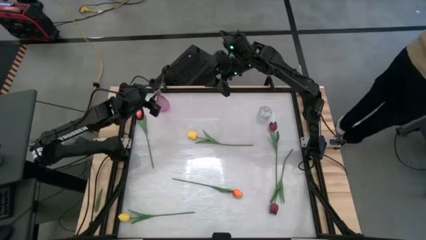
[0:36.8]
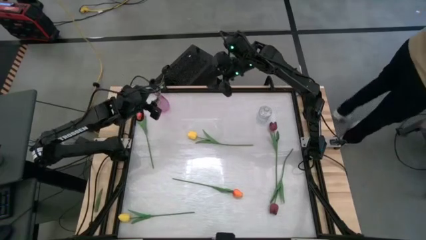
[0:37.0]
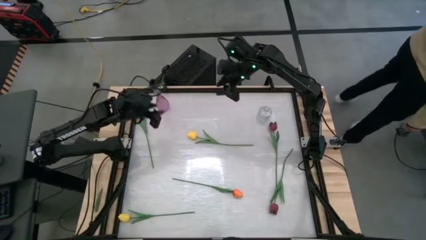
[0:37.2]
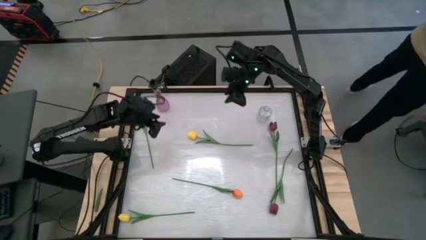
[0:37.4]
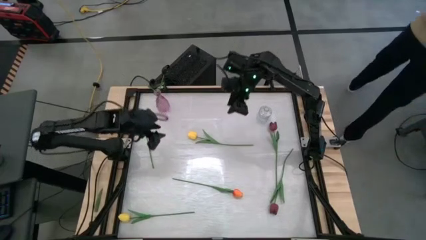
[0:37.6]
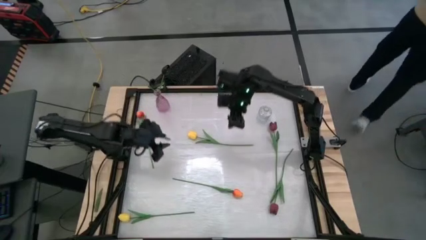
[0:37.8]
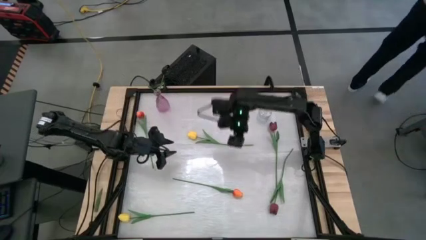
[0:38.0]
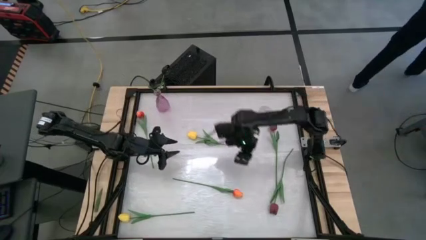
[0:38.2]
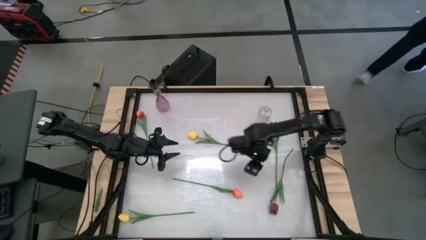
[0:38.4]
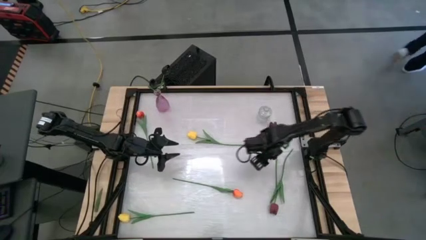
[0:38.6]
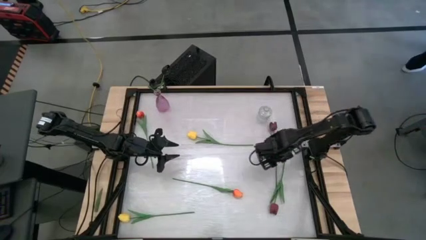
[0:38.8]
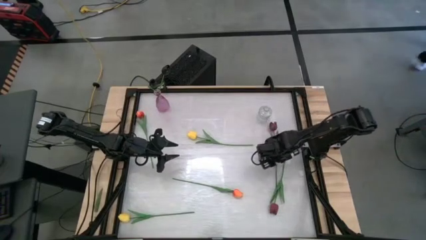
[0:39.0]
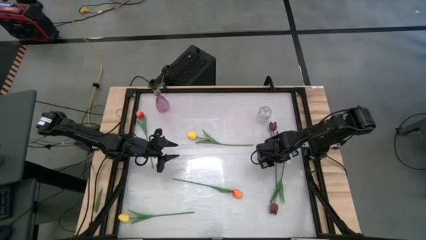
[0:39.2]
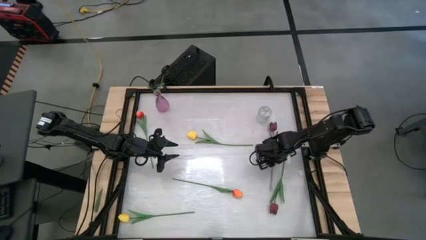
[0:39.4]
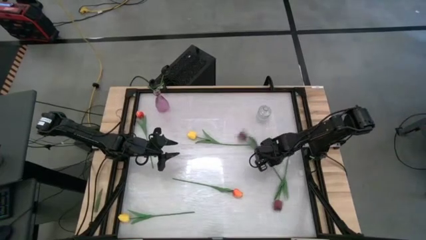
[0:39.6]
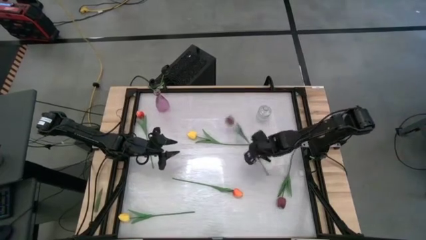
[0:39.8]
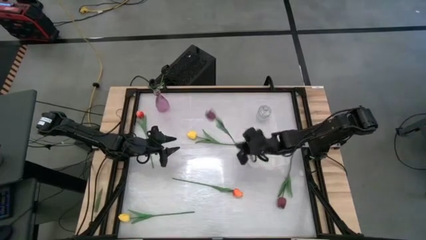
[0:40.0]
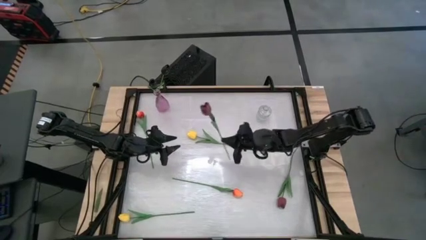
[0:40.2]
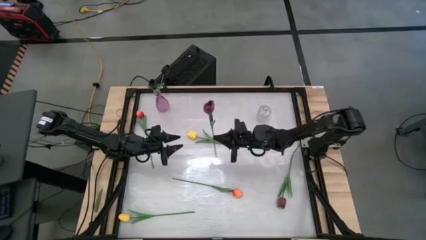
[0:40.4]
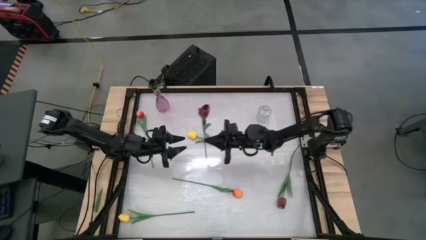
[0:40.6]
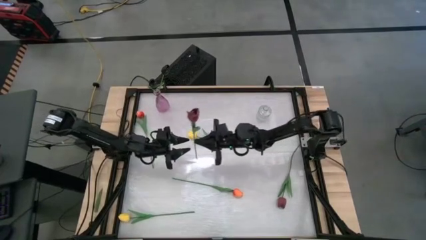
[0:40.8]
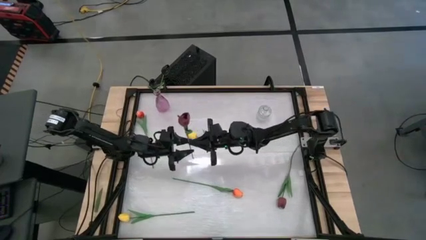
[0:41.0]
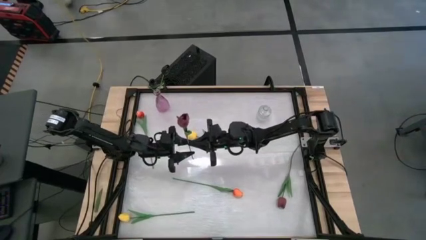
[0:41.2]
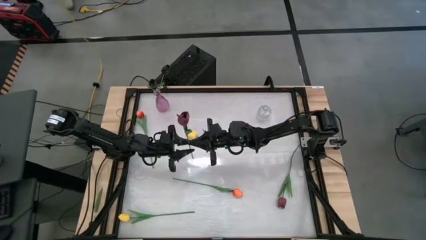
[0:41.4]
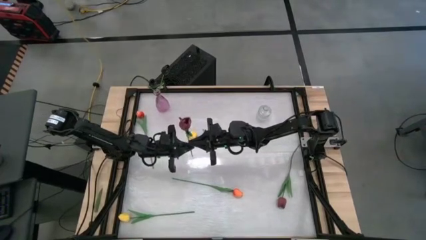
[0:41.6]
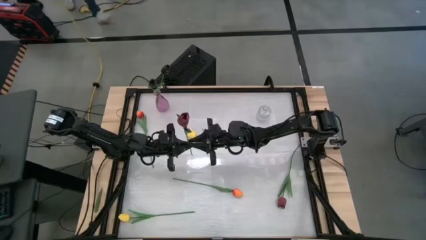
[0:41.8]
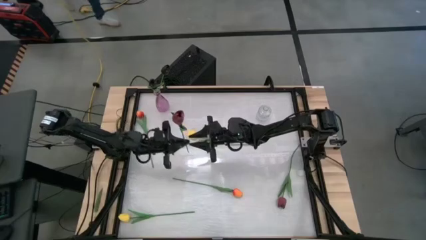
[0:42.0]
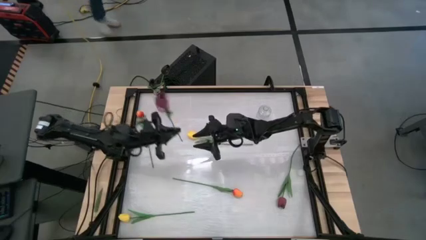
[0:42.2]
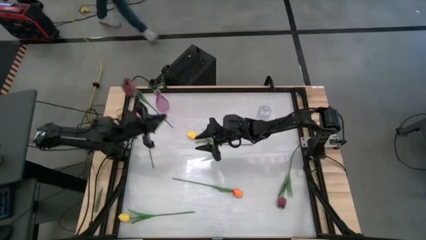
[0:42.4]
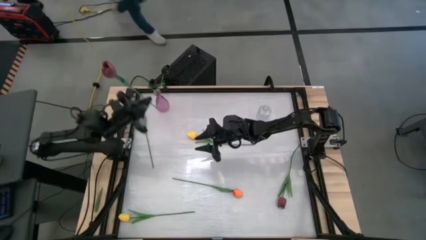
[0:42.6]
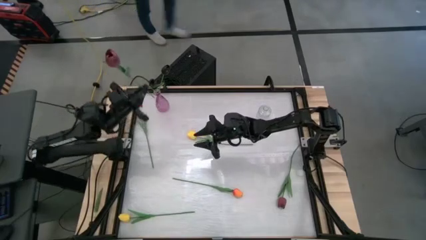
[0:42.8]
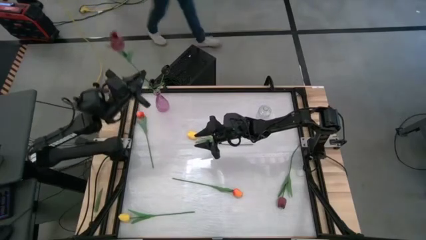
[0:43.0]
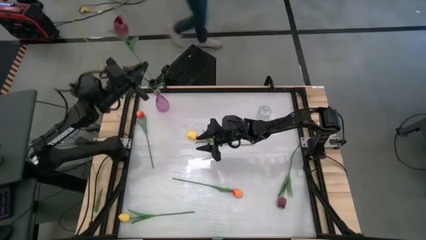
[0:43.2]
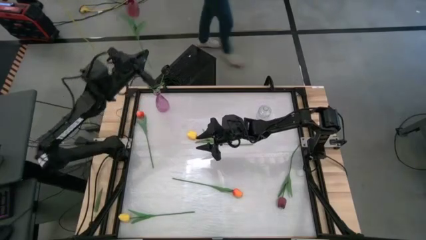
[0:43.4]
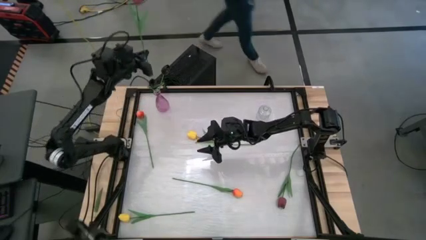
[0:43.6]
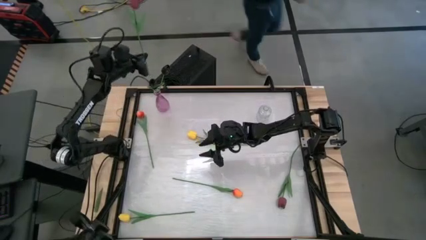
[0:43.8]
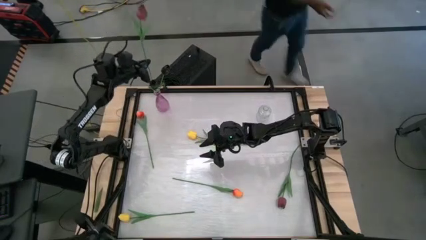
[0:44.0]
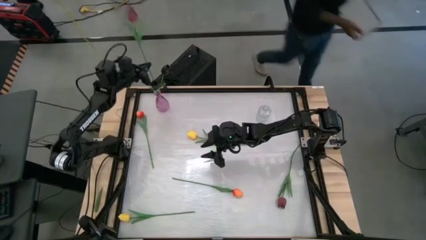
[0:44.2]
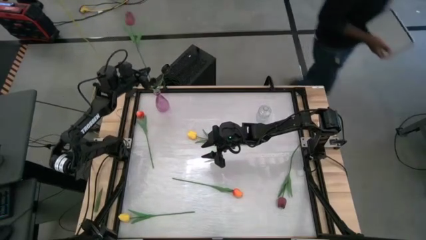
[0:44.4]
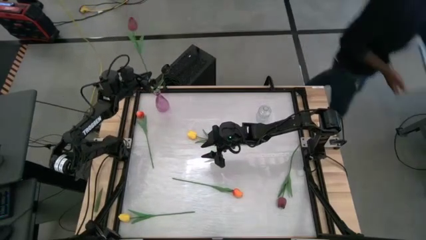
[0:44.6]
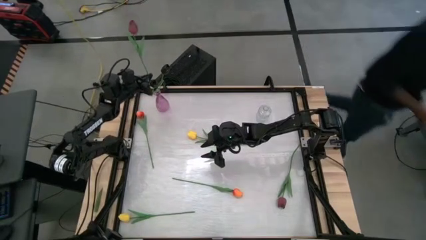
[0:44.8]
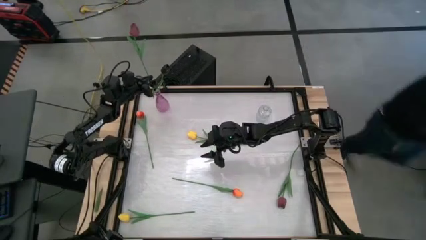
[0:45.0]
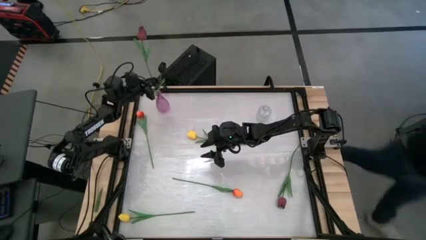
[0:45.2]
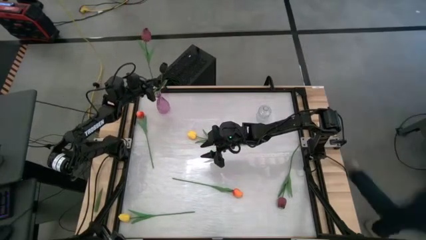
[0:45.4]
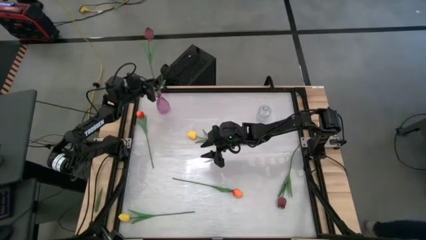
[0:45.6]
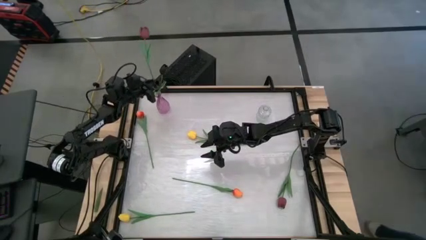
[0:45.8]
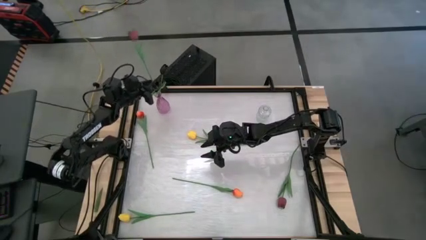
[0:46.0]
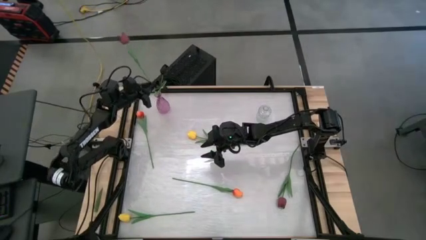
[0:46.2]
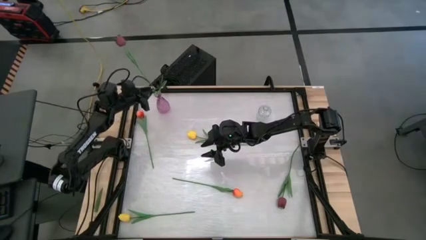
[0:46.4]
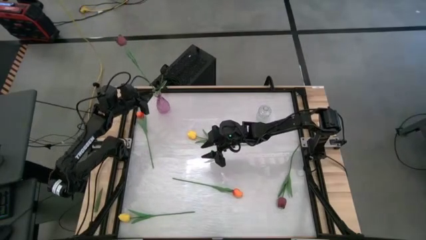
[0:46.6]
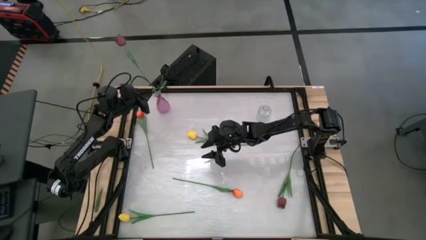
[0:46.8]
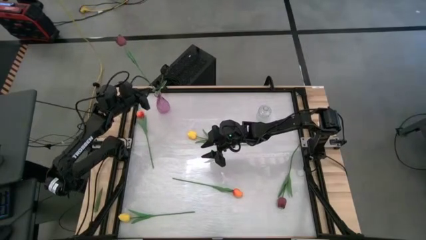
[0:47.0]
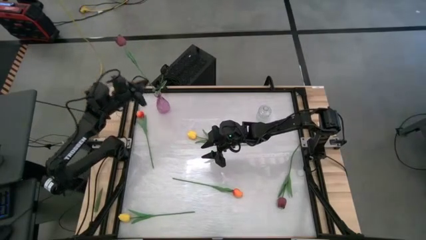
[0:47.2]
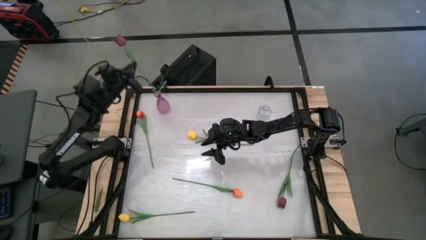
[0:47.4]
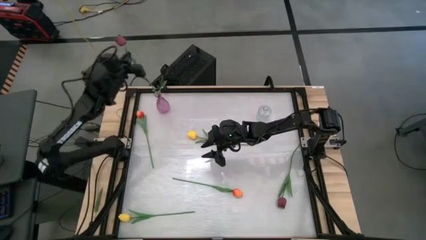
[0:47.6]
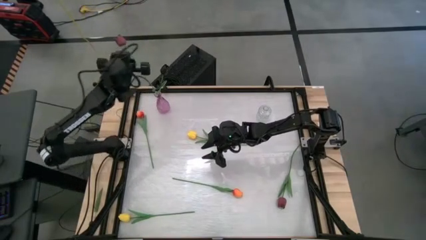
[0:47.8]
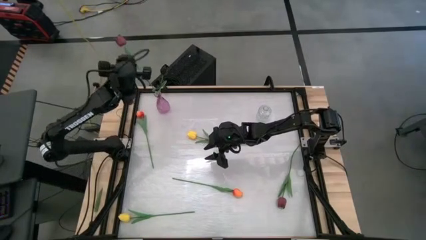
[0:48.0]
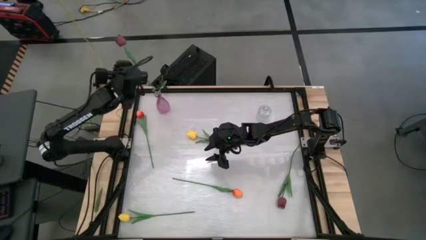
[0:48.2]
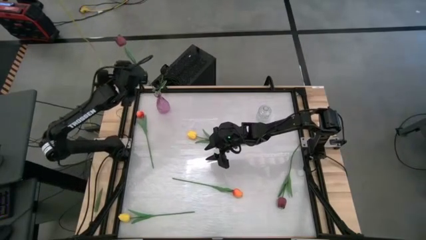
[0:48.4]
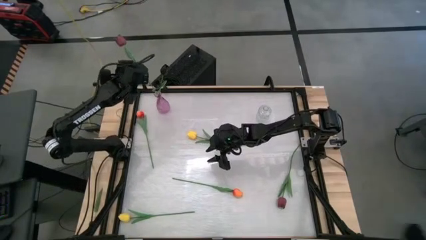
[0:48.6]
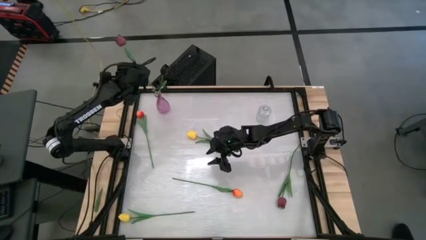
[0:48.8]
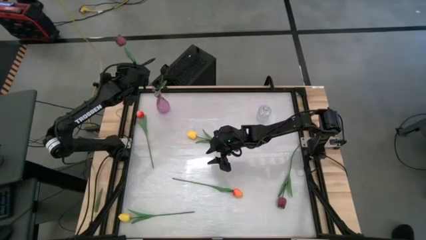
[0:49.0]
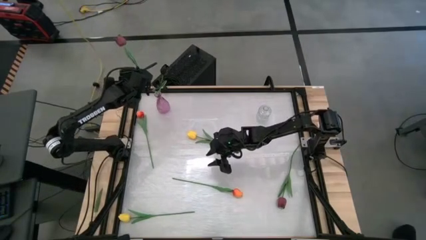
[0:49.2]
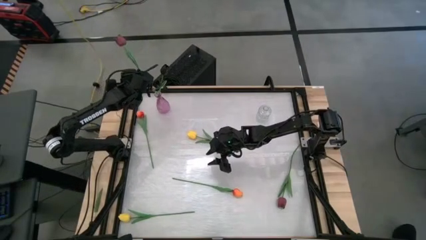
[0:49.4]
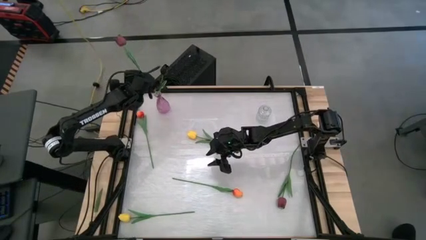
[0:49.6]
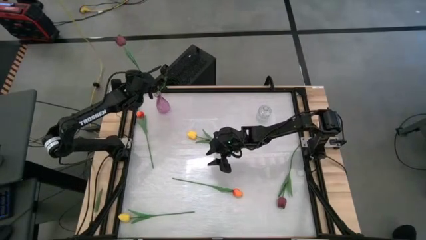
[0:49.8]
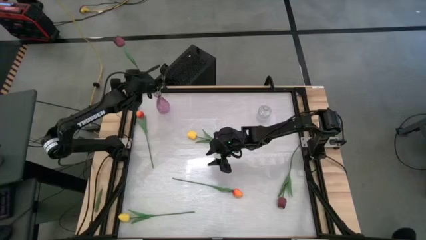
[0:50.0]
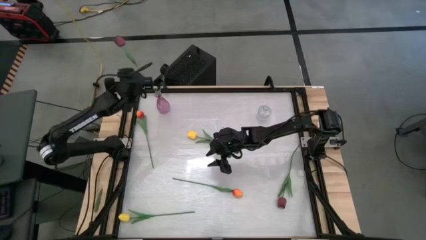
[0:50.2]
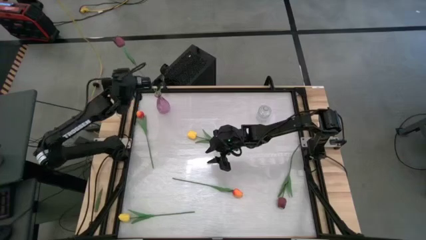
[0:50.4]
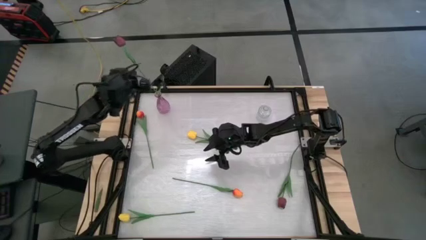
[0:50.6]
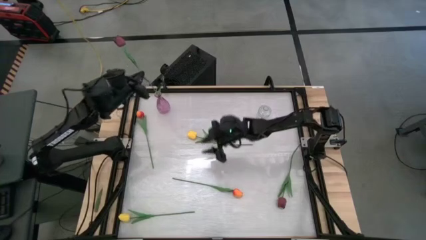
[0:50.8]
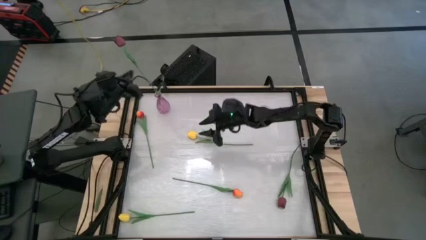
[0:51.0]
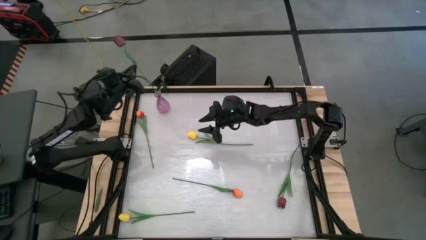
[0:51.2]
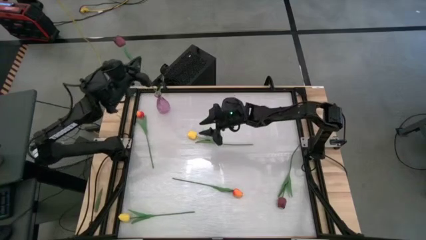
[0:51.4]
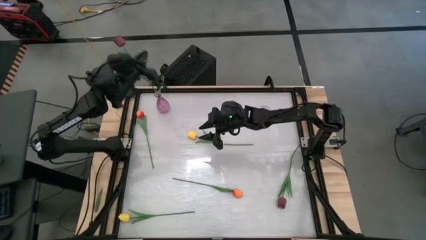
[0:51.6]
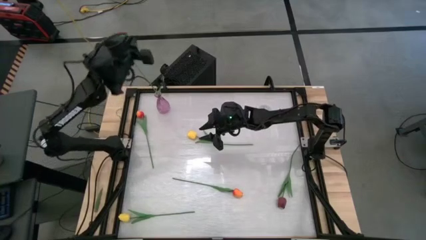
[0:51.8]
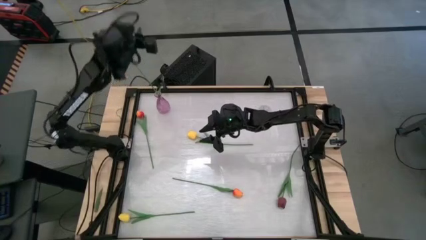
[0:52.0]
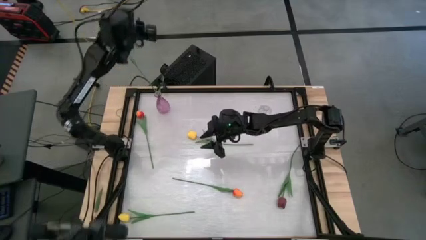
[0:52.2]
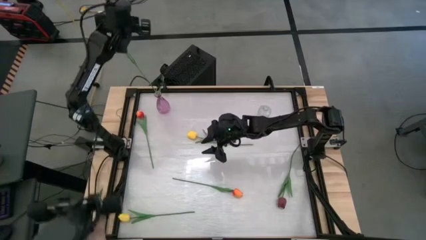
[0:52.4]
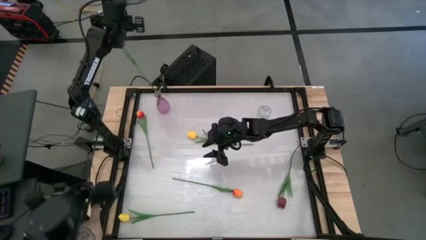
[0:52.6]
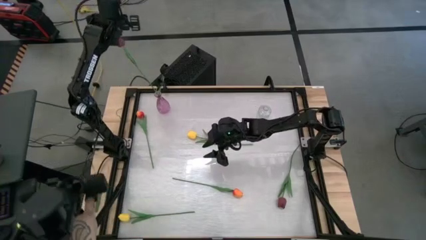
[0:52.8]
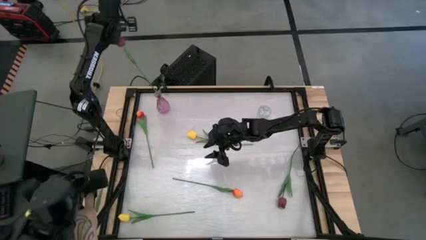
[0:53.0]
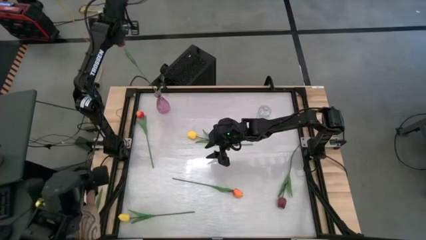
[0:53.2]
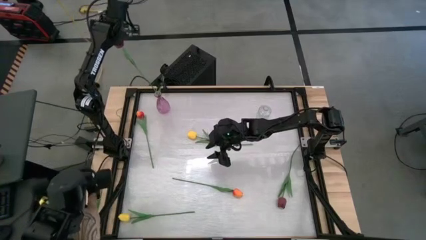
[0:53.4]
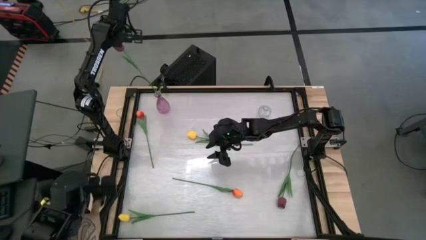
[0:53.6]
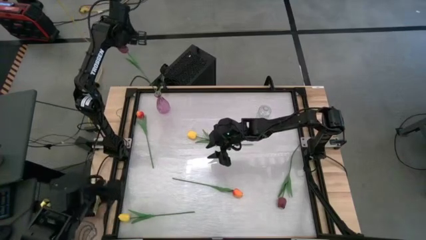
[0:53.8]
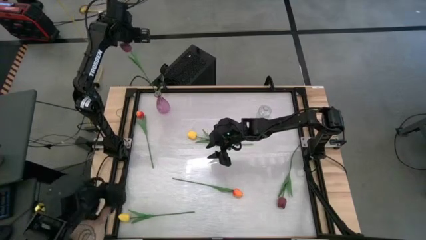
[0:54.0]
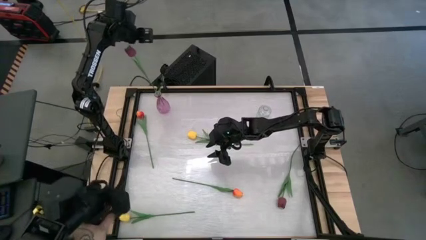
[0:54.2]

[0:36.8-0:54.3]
Task: Sort flowers into vase by color
Put the top red tulip into the violet vase
